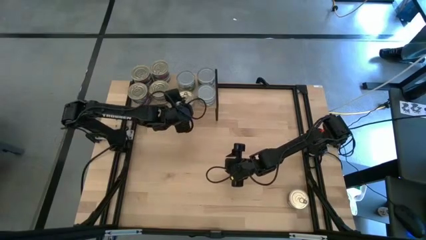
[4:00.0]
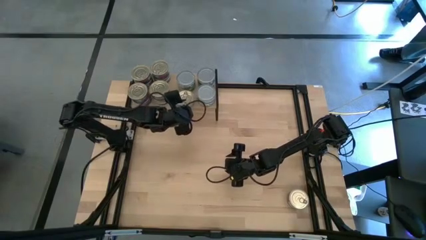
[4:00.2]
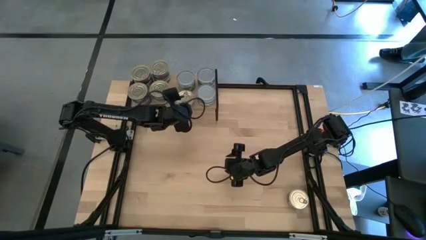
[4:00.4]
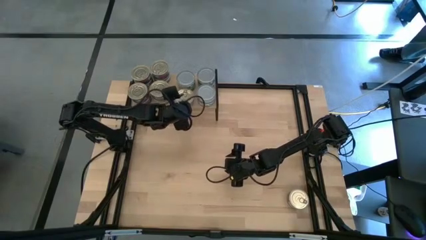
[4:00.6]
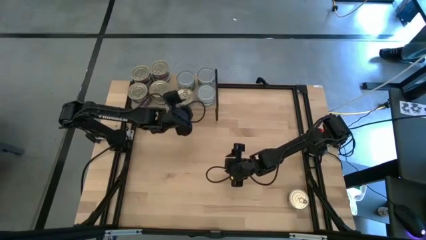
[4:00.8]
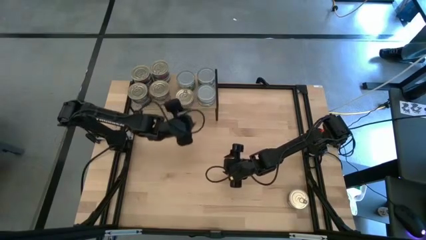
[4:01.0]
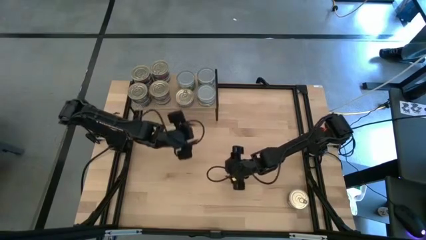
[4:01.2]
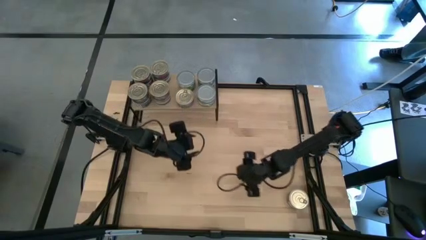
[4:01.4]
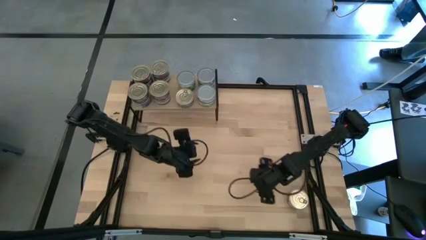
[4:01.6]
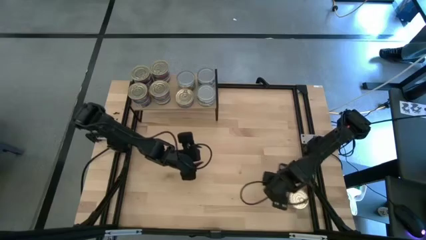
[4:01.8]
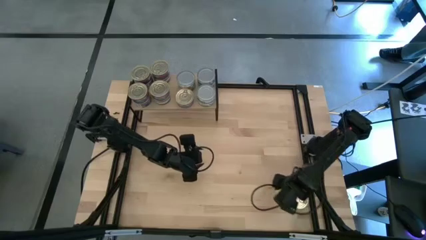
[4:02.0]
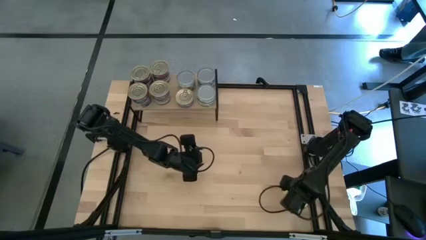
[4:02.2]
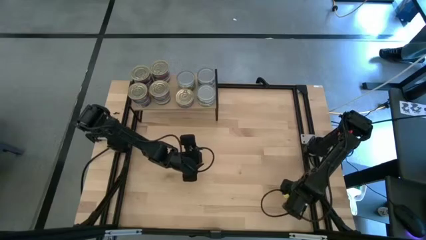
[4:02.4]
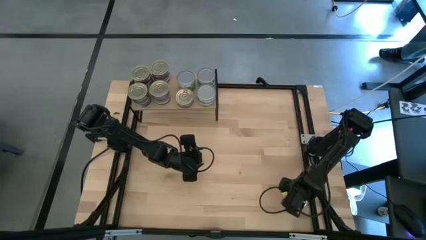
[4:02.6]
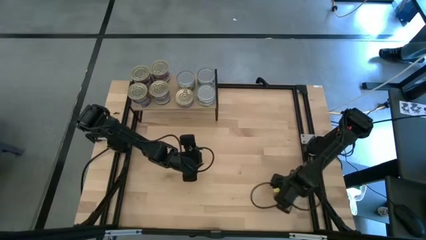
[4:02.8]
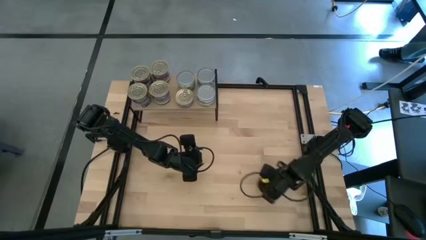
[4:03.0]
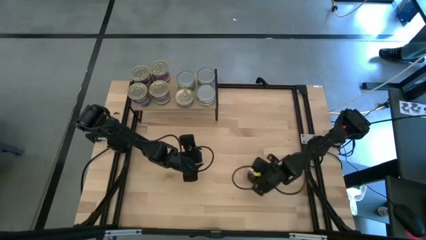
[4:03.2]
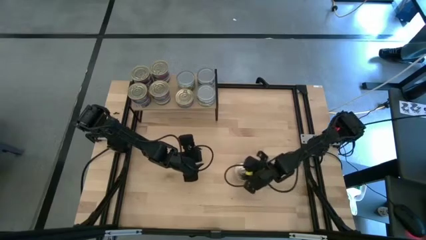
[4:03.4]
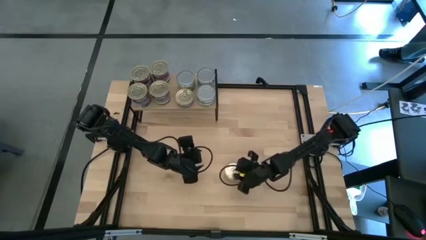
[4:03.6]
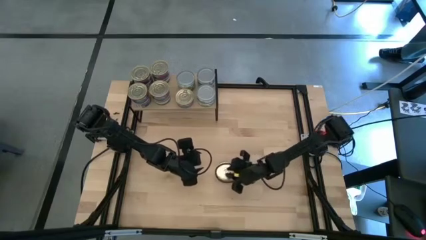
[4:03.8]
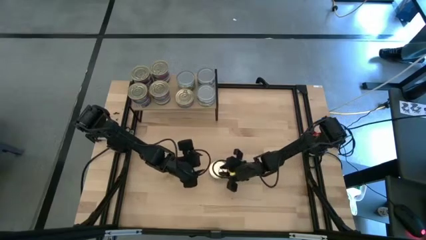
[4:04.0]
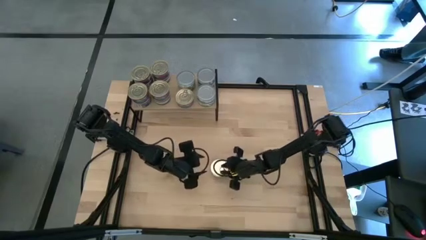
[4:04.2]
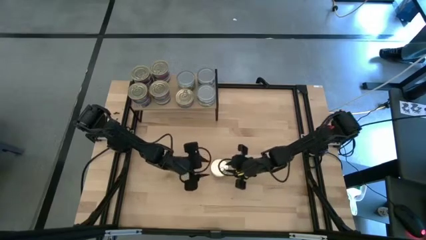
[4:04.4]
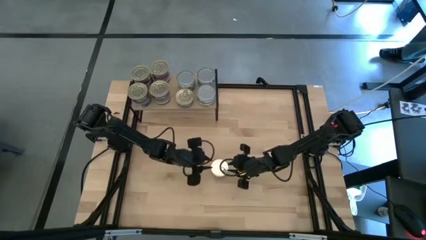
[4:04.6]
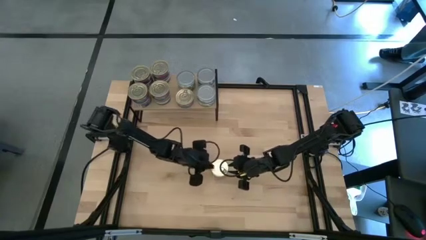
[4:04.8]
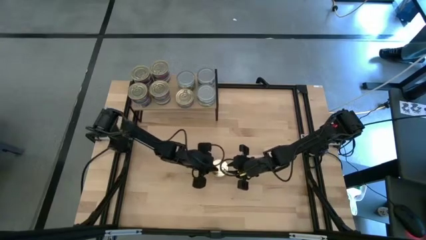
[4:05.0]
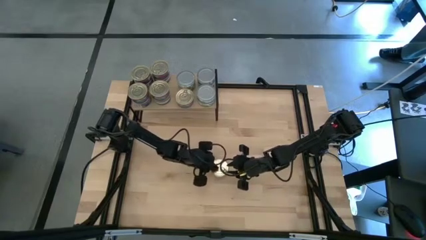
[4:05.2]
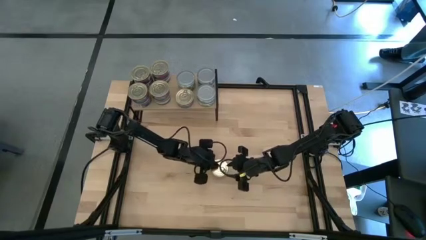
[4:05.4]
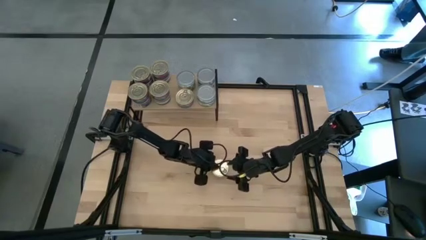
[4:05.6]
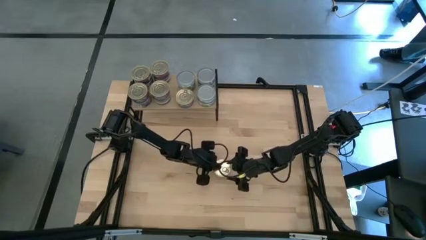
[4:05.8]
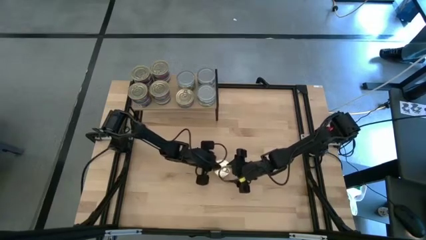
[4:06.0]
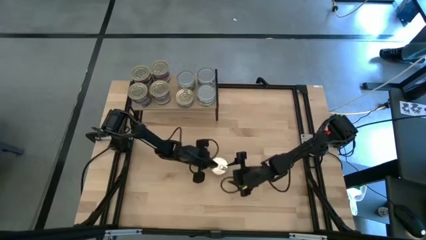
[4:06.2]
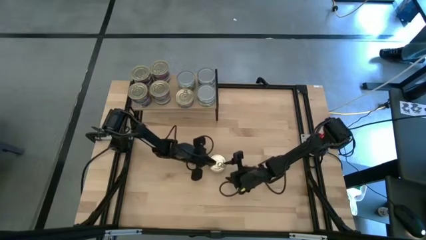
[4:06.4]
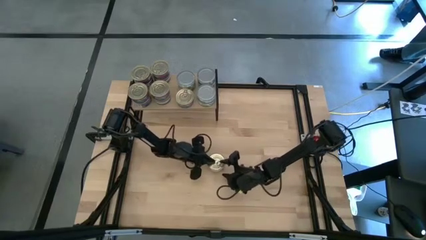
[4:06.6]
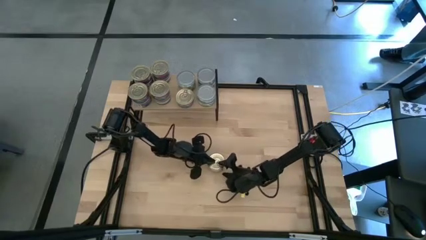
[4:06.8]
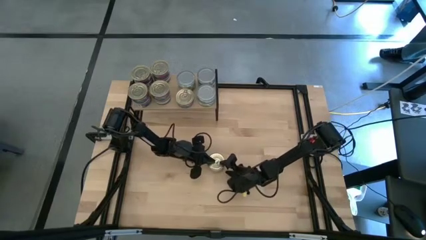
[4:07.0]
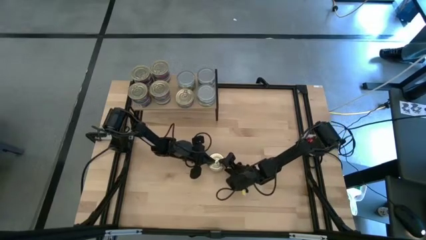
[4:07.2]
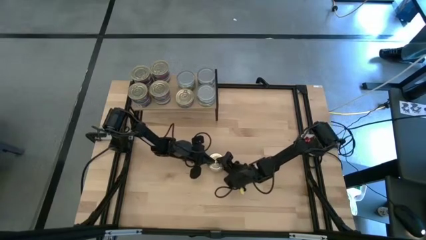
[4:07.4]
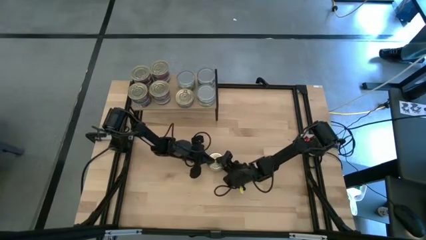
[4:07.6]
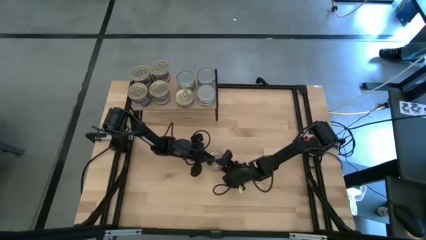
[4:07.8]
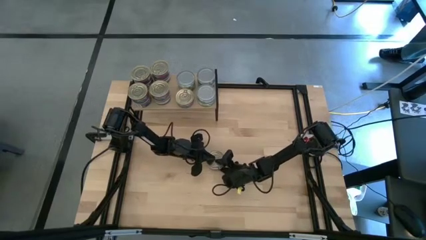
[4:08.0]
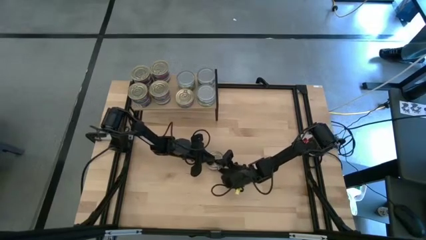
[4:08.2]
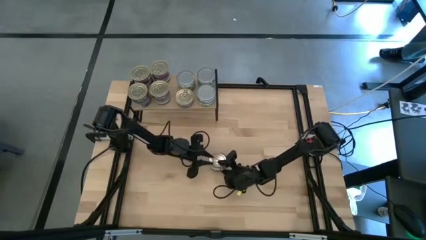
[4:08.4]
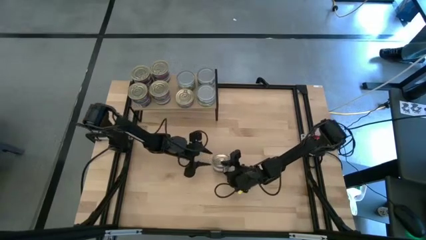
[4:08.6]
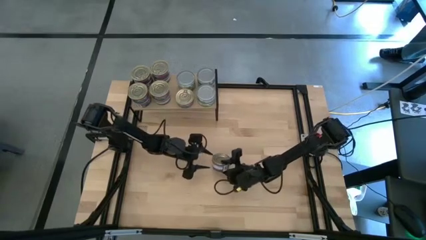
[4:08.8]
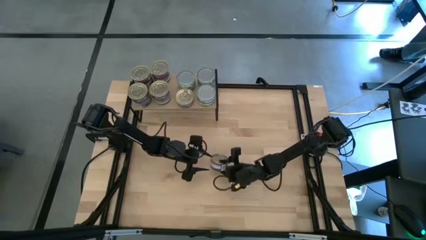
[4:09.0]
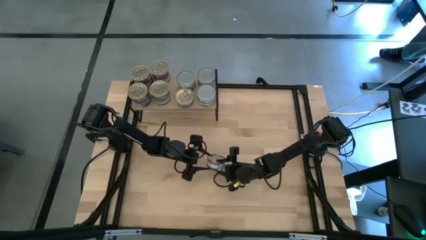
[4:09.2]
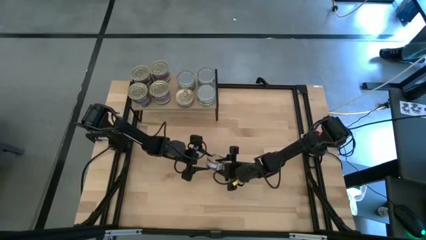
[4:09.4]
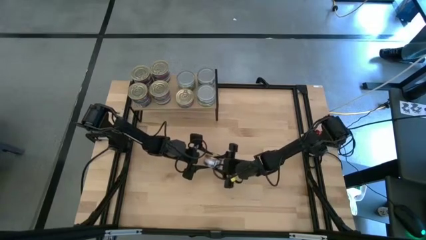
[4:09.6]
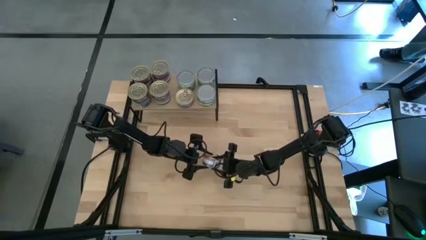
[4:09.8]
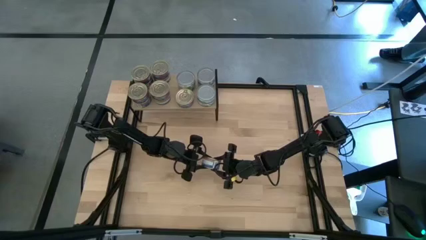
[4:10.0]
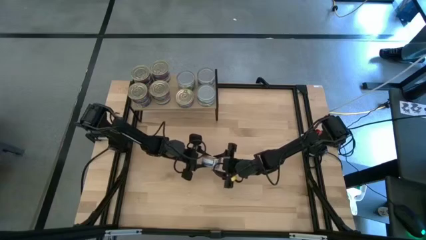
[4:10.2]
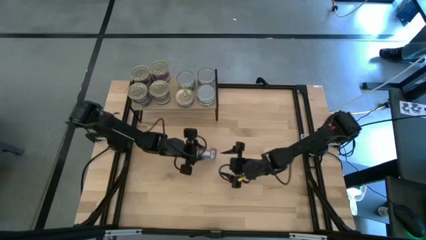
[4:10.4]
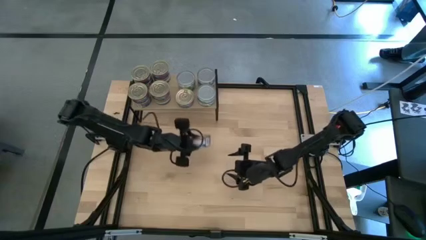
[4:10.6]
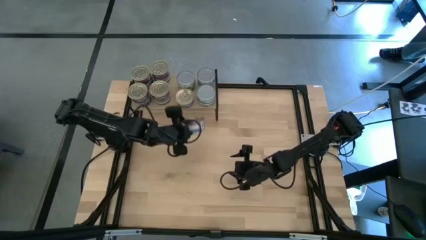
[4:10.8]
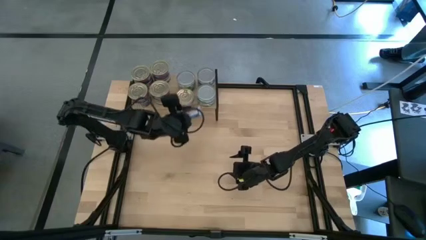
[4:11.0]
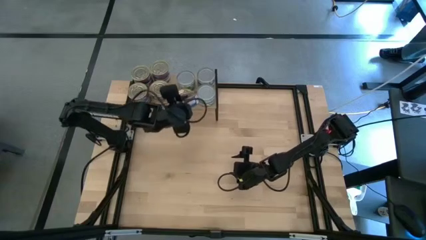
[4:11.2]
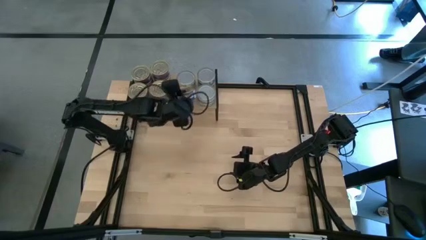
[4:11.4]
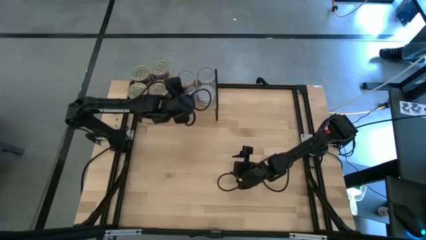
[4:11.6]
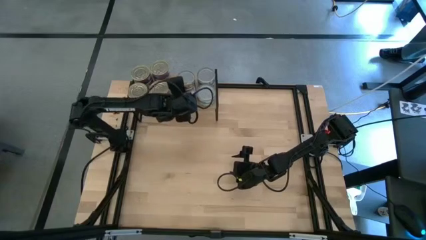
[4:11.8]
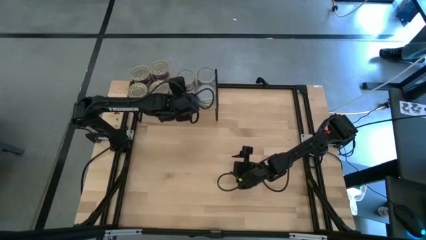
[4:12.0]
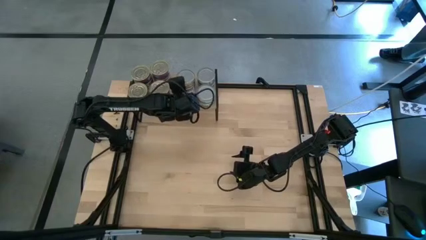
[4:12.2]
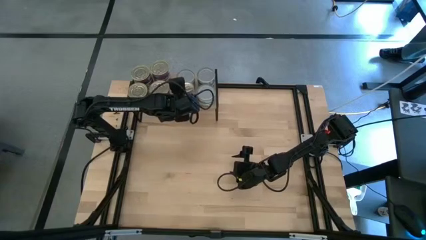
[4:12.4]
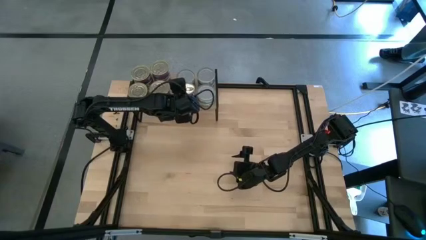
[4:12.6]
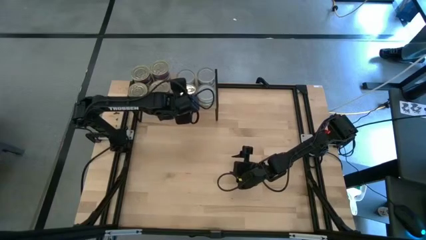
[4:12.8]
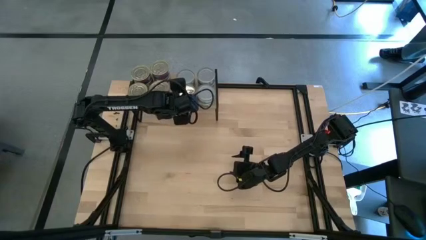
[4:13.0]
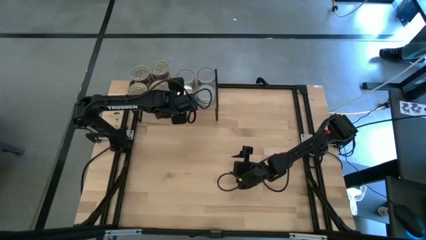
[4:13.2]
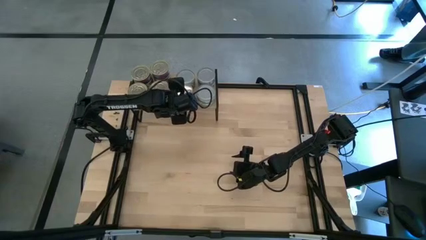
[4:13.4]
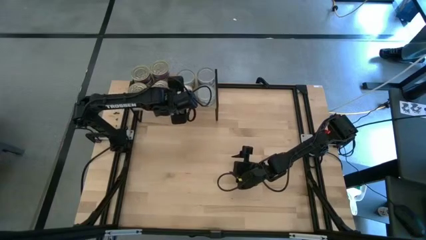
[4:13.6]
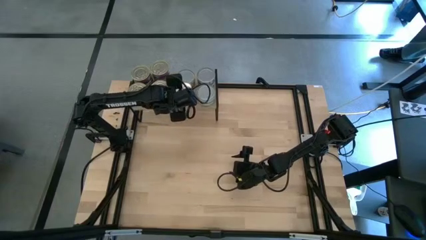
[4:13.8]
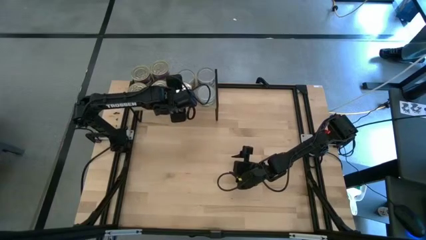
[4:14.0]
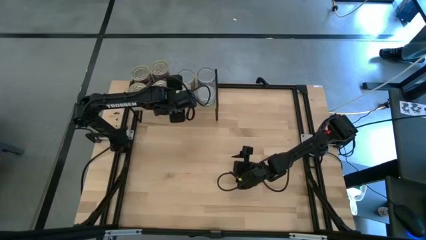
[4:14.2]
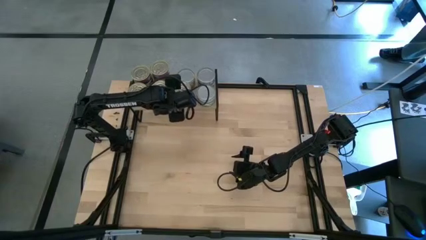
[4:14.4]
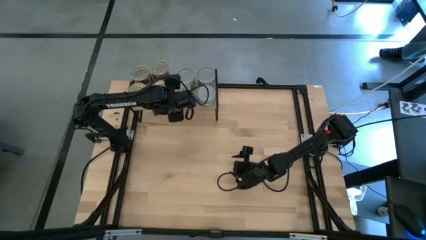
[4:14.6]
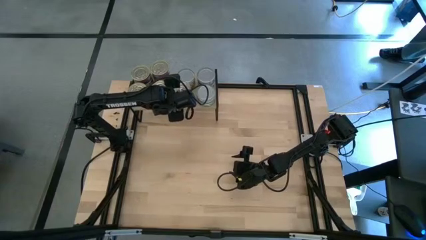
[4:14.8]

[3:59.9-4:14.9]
Task: Stack canned seafood by type on shelf
Stack the blue tuna can on top of the blue tuna can on the shelf
